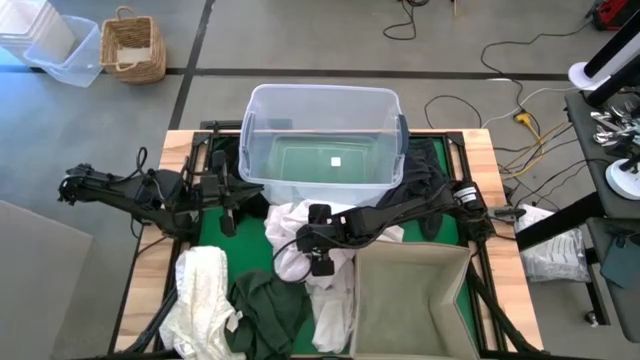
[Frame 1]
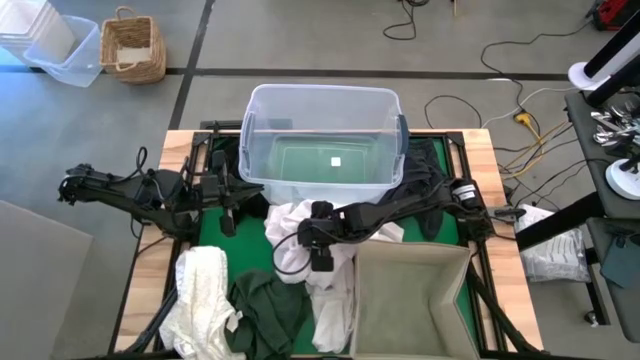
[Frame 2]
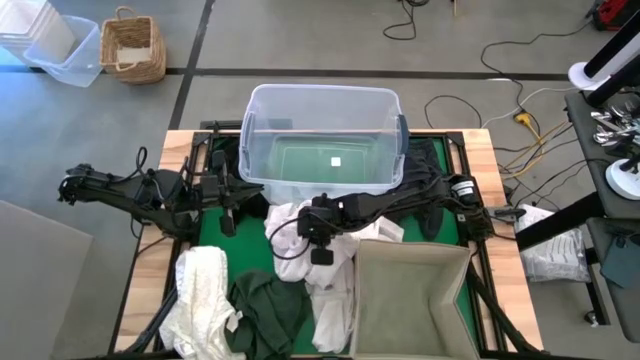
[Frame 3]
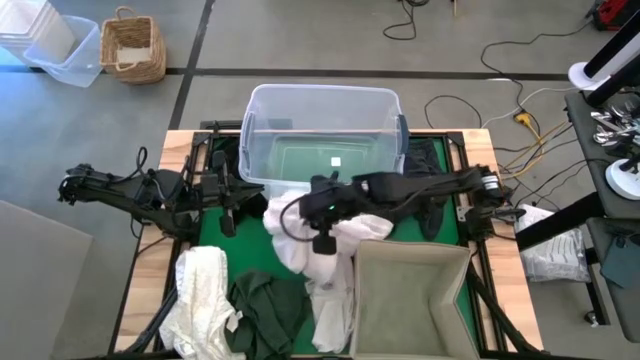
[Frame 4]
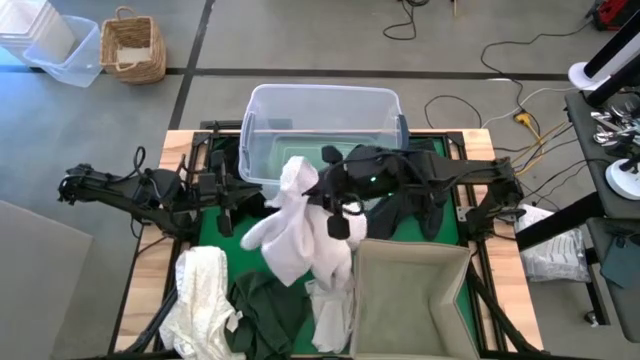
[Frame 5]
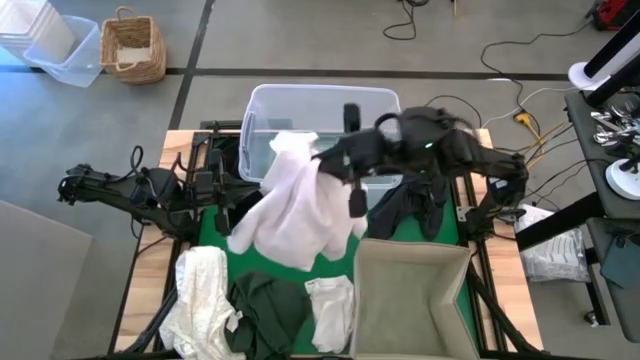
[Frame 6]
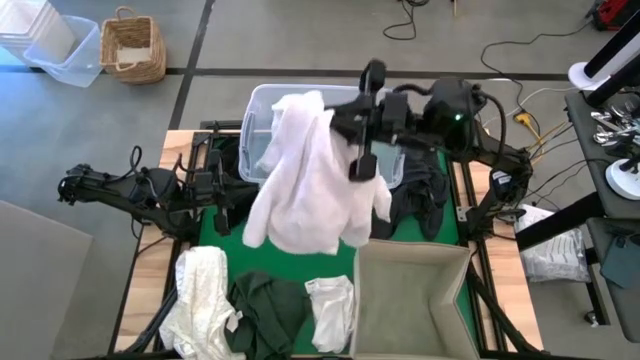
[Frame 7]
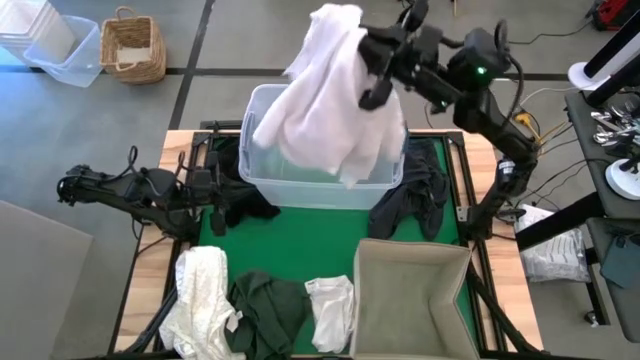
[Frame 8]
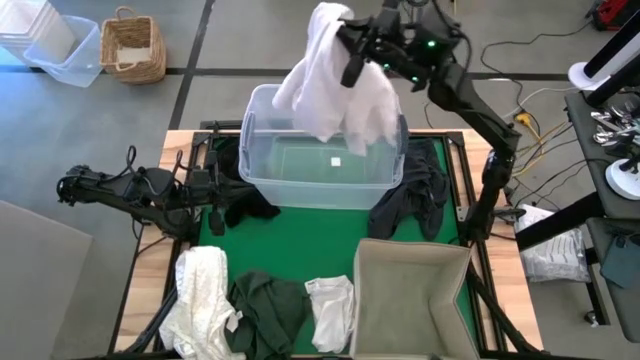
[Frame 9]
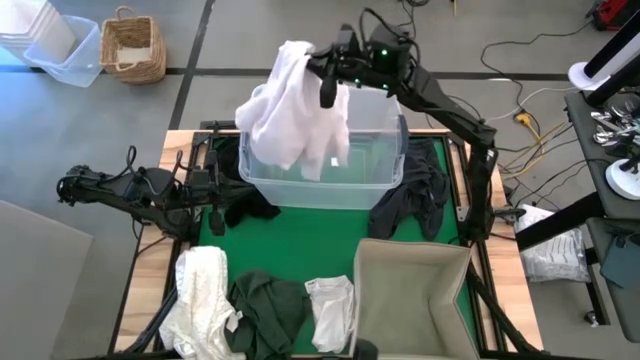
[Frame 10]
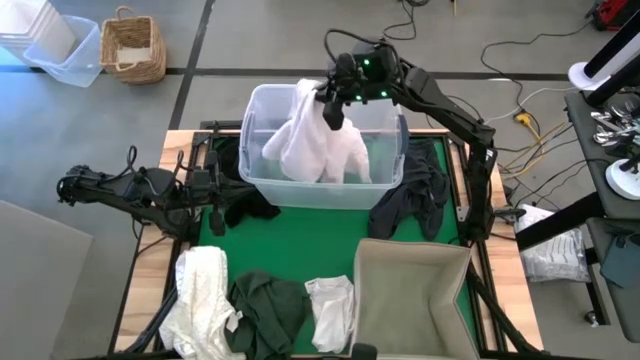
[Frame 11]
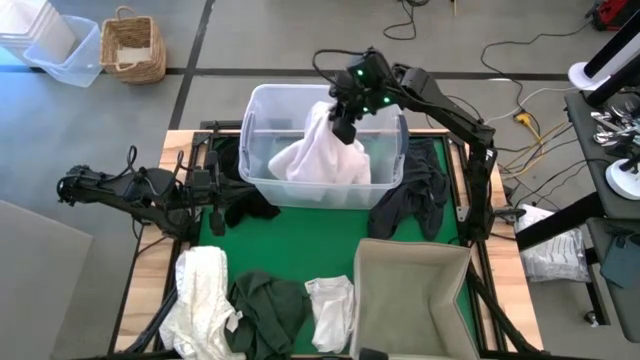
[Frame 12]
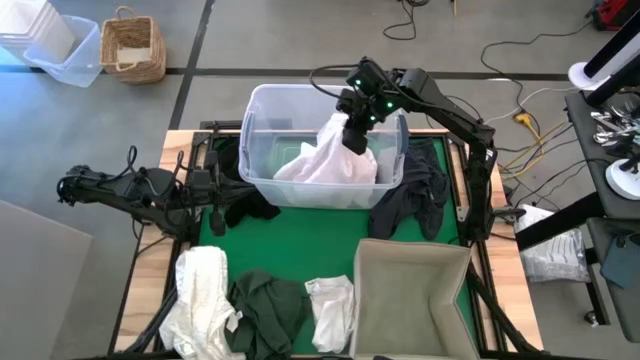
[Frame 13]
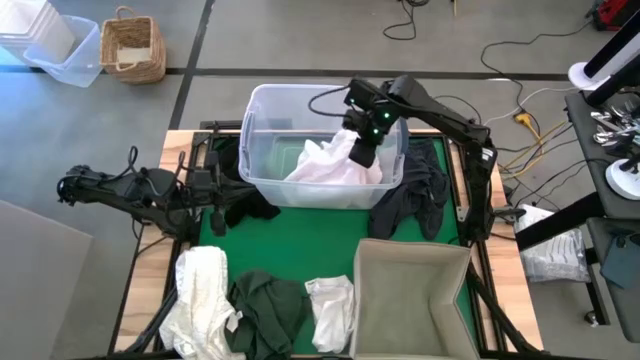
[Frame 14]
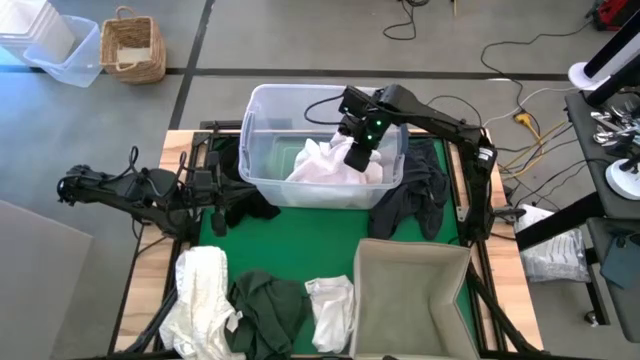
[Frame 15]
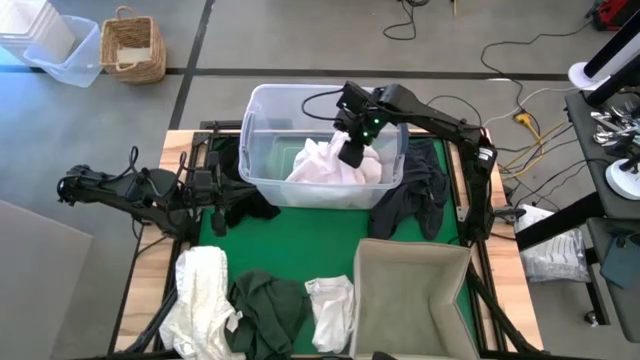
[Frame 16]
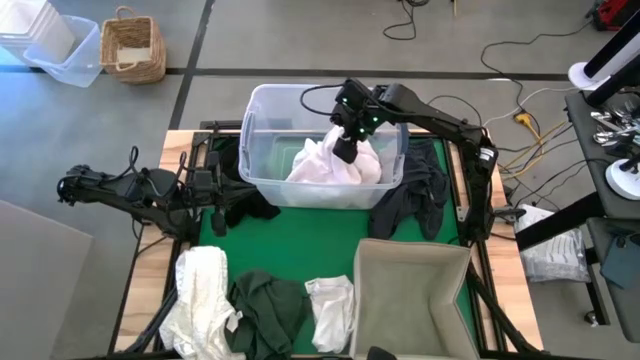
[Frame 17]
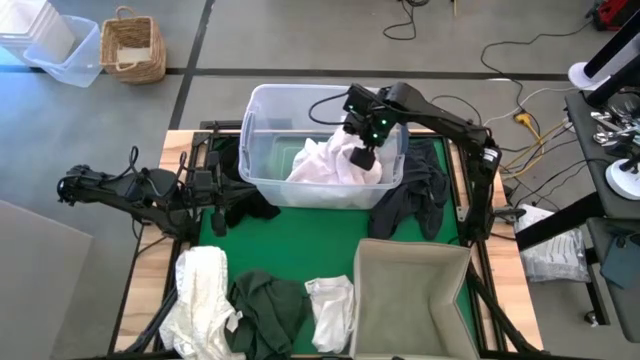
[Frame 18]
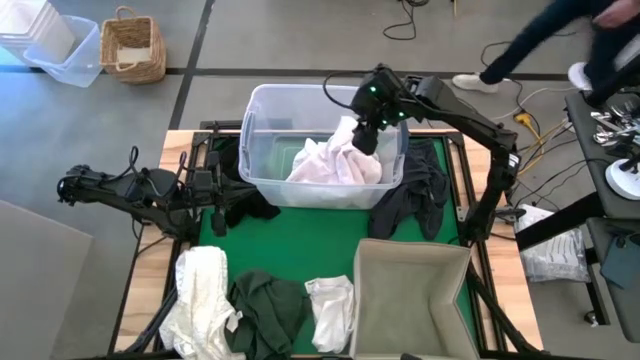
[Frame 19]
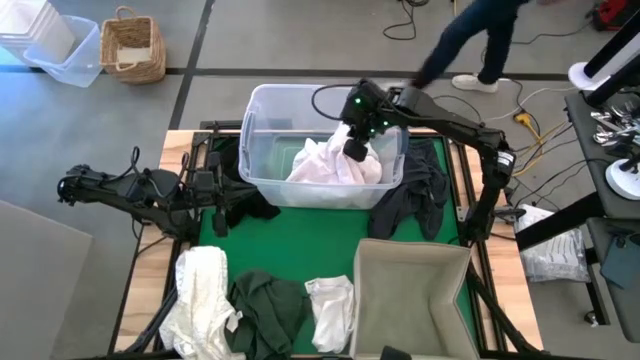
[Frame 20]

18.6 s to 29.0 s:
Put the top white shirt into the transparent laundry bin

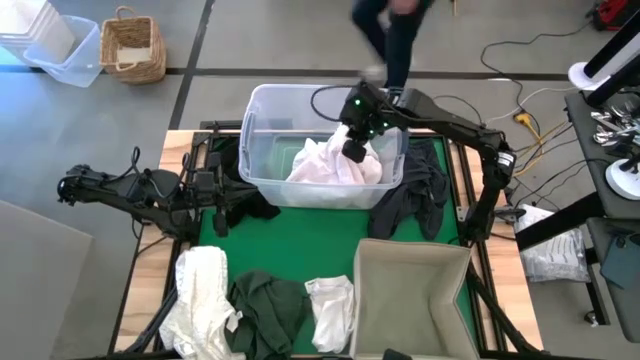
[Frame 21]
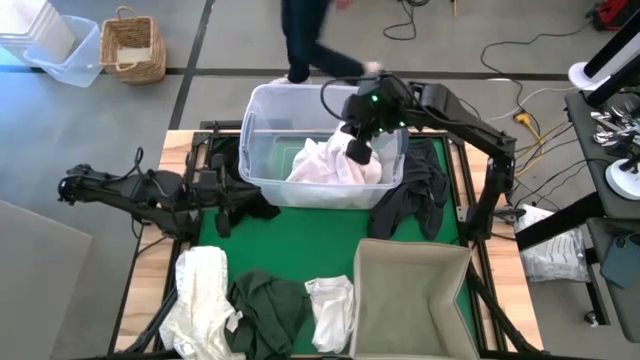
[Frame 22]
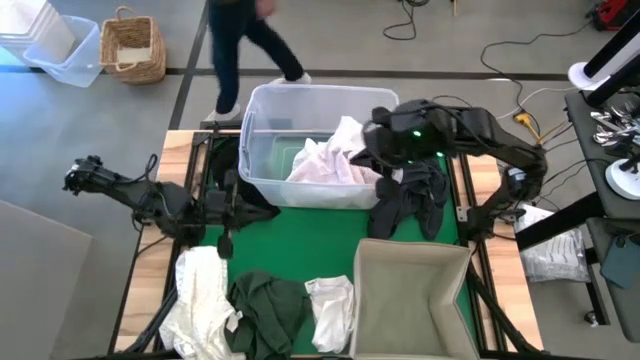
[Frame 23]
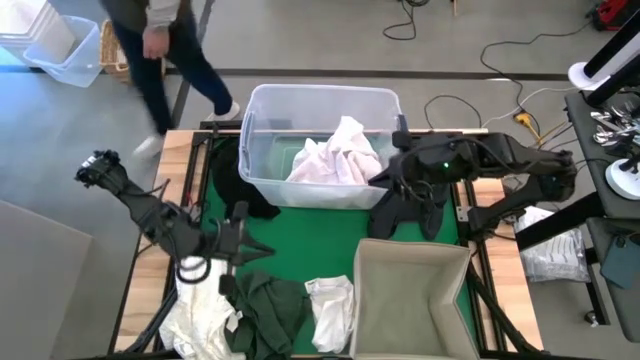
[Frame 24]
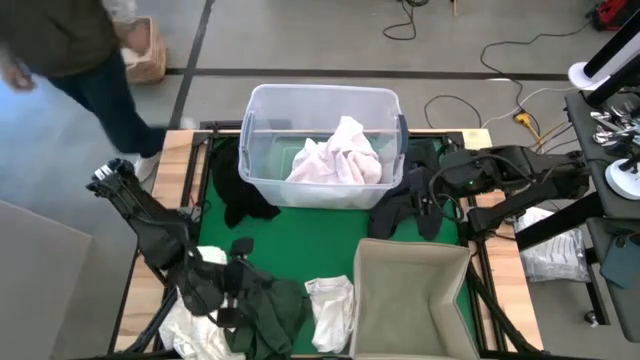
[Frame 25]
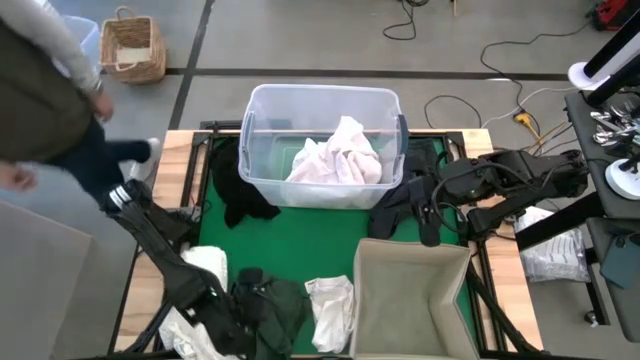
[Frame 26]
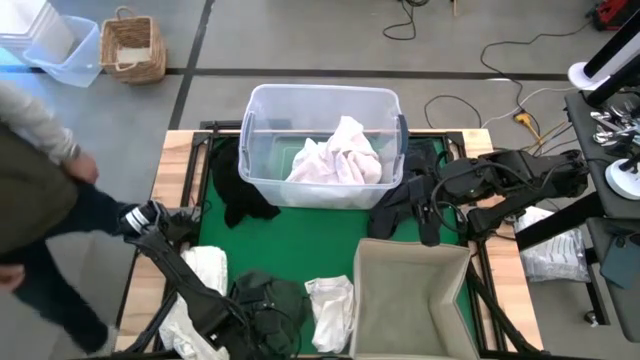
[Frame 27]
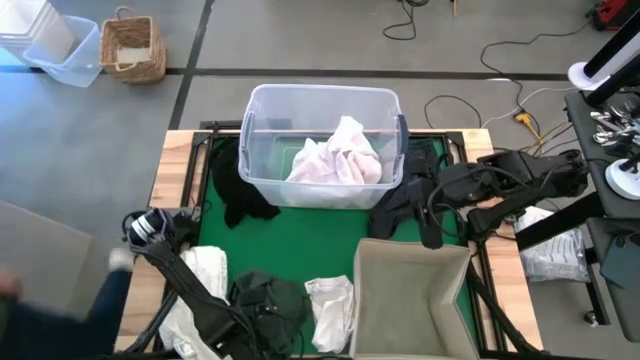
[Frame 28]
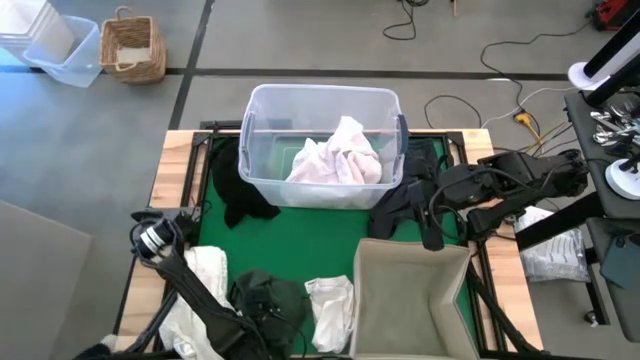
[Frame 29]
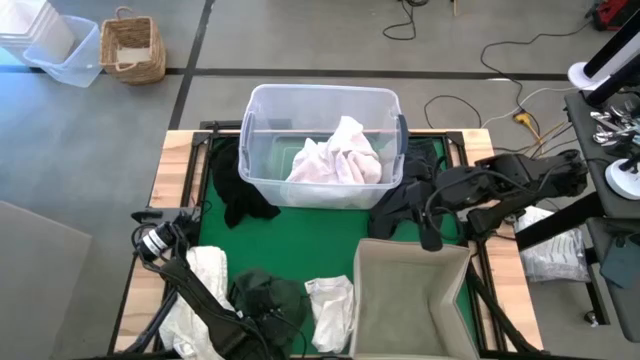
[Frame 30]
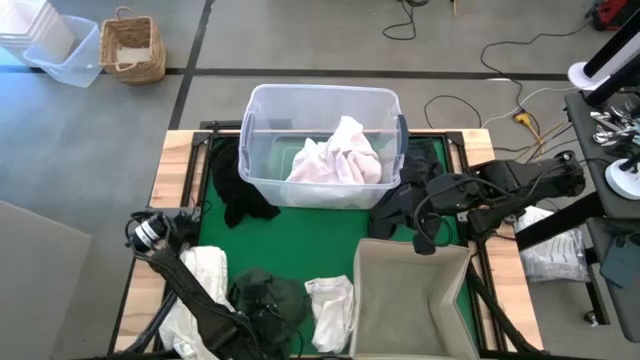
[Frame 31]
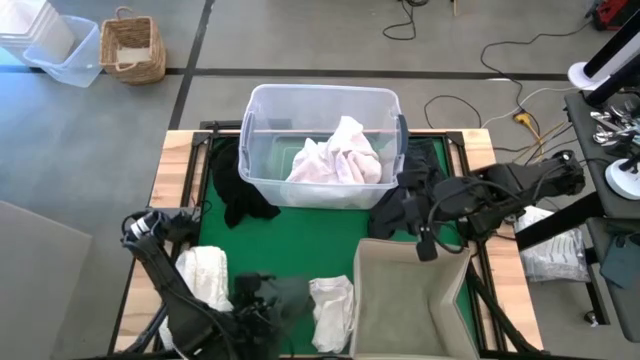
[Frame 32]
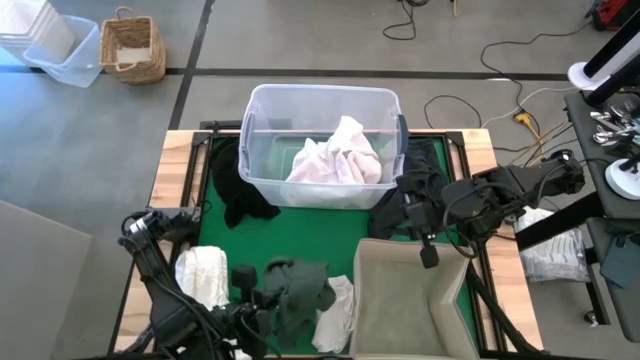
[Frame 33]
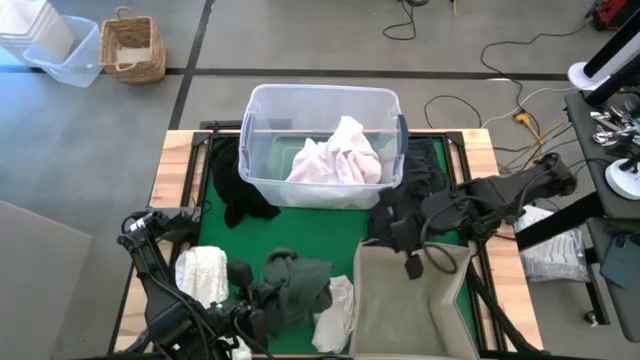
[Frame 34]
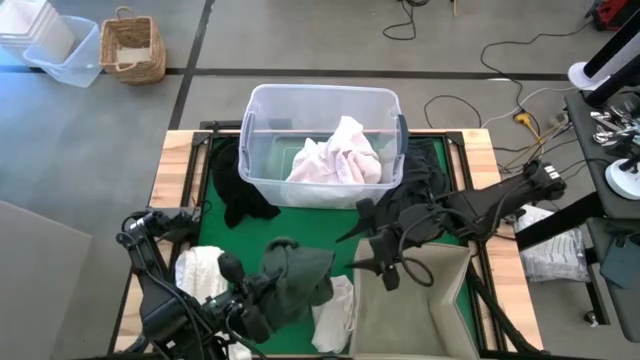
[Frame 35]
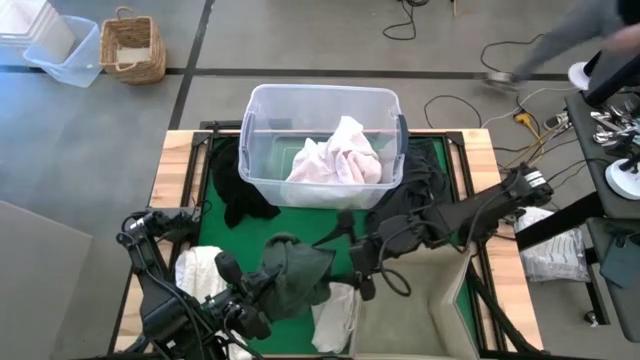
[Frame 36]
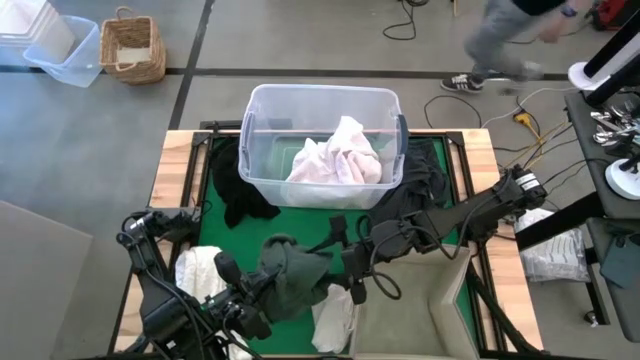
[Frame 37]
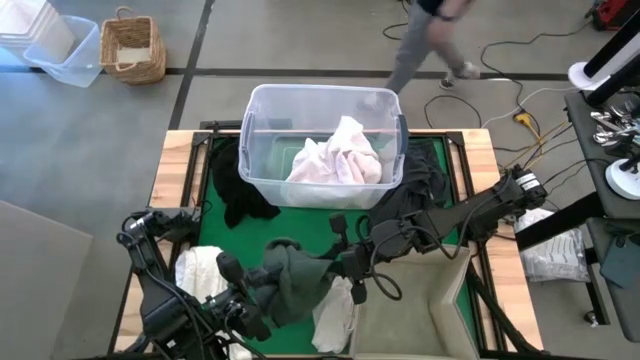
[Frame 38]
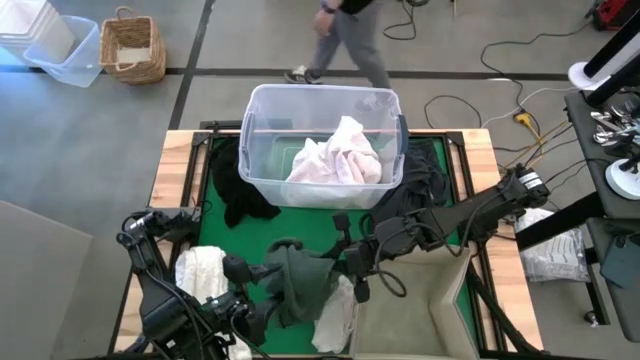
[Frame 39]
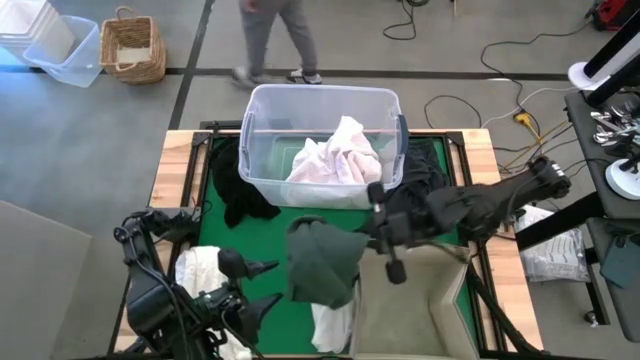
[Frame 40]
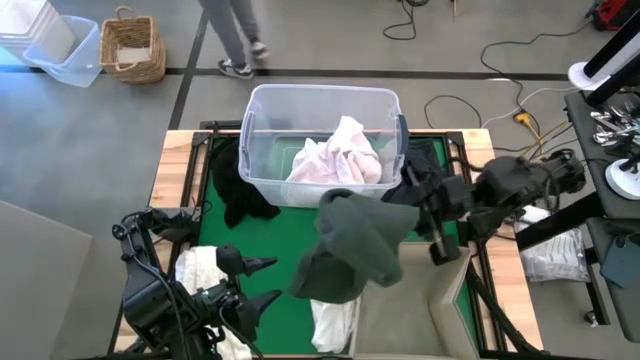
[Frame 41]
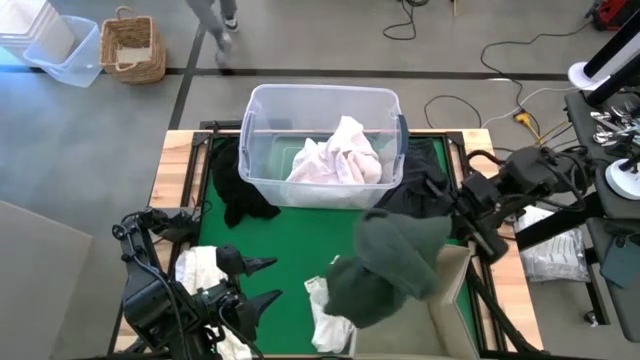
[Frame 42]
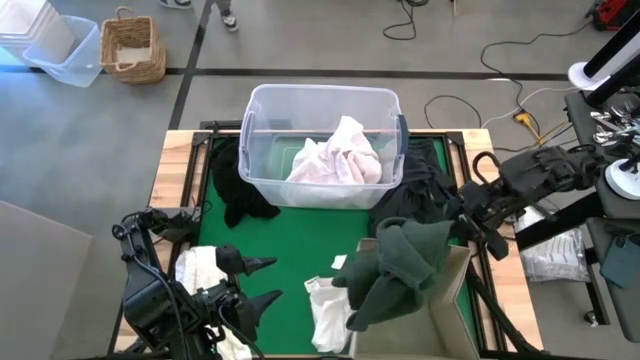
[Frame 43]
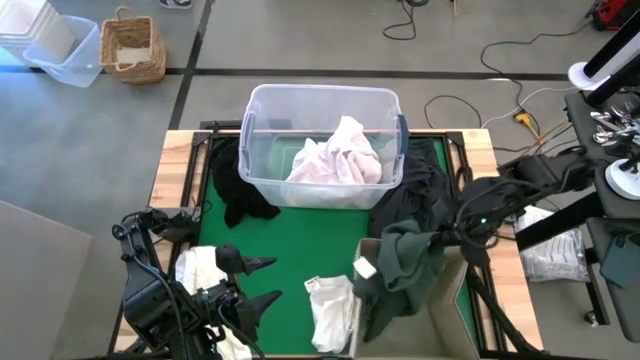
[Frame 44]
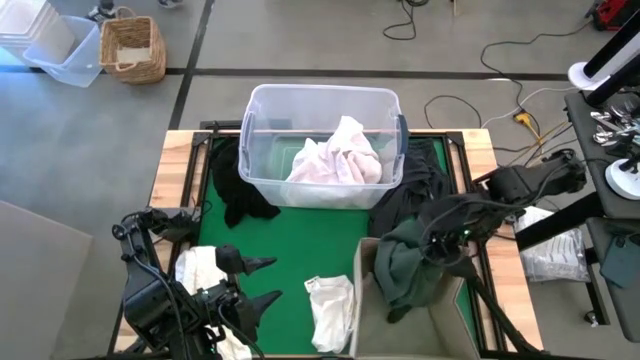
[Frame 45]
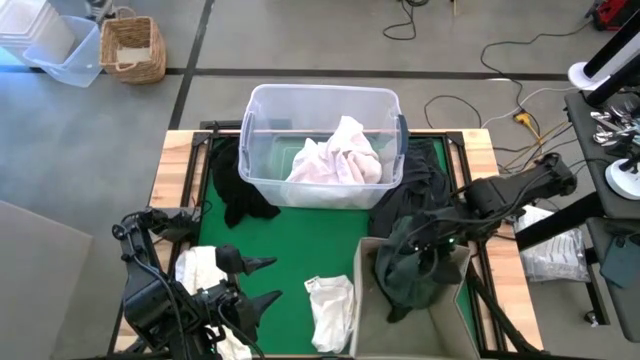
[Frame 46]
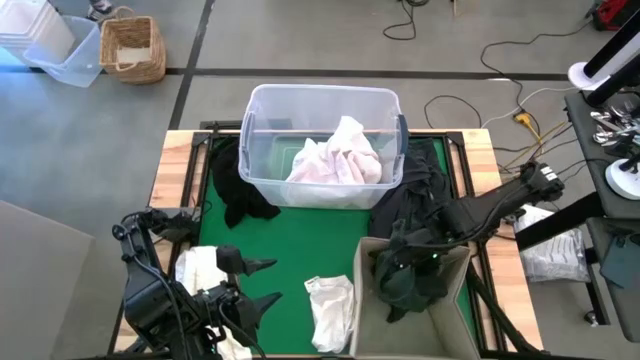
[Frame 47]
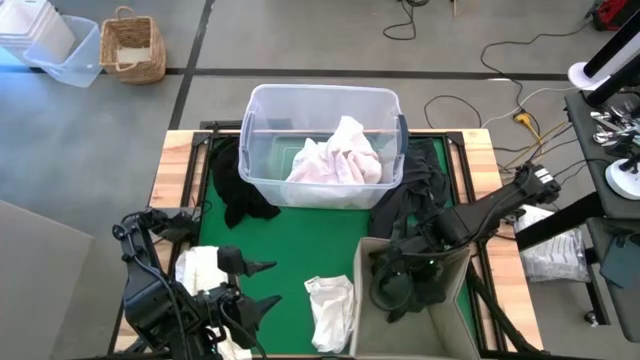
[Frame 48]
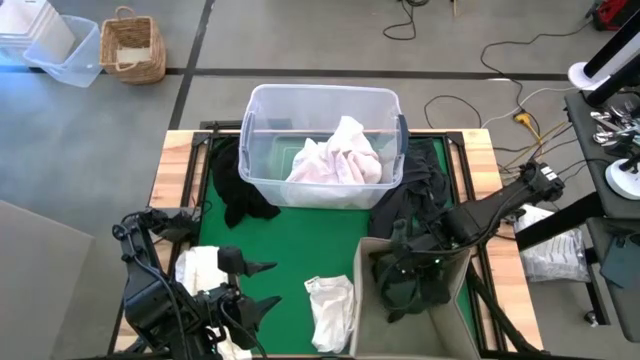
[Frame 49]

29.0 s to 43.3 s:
Put the green shirt into the brown laundry bin
